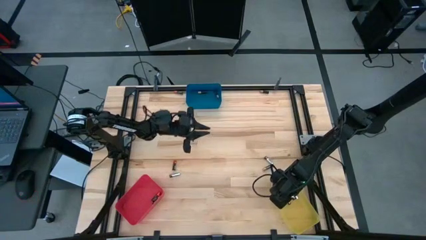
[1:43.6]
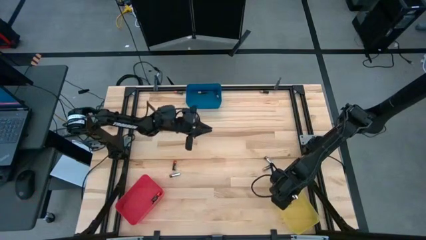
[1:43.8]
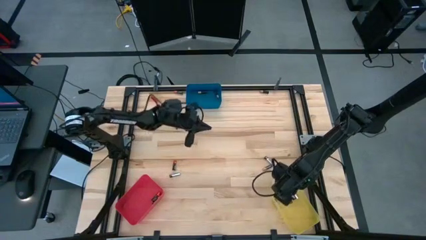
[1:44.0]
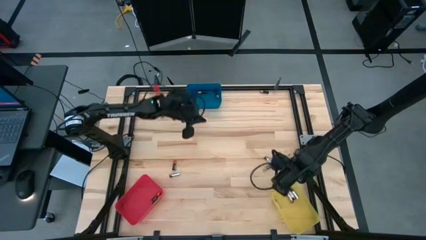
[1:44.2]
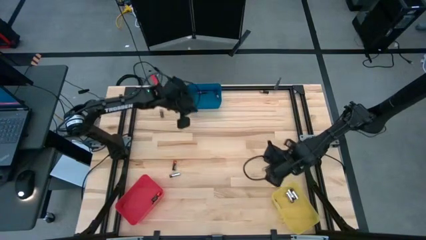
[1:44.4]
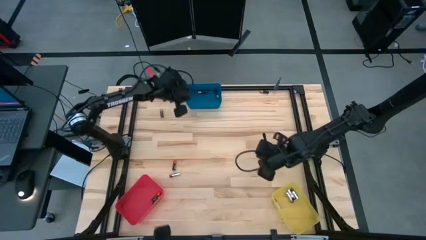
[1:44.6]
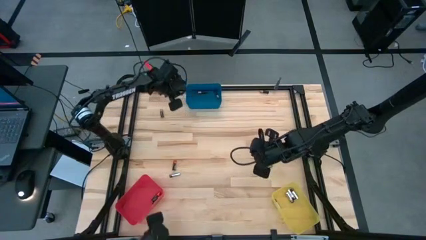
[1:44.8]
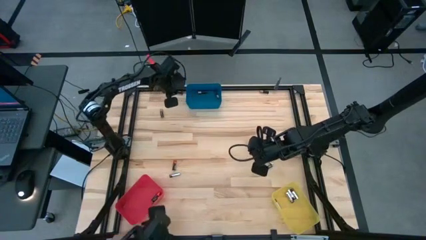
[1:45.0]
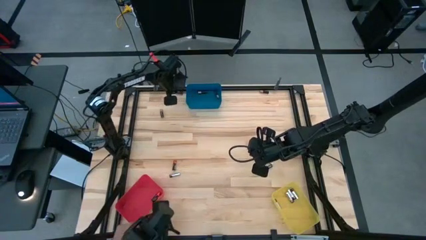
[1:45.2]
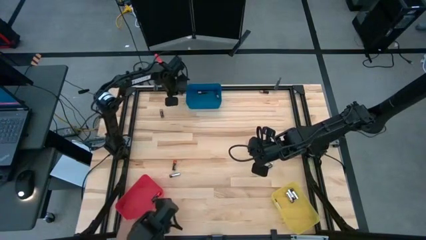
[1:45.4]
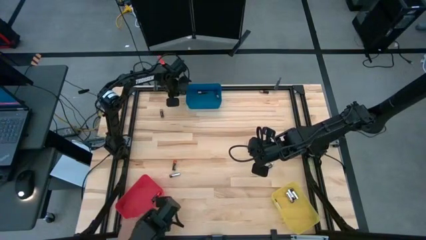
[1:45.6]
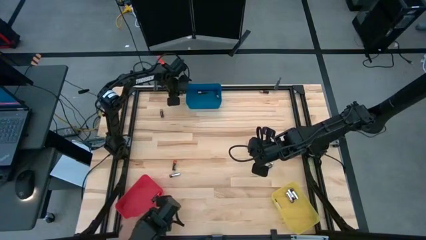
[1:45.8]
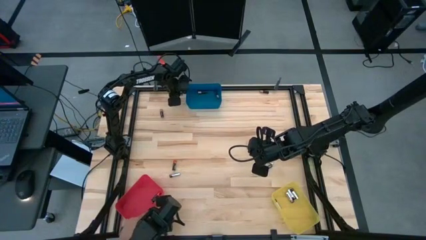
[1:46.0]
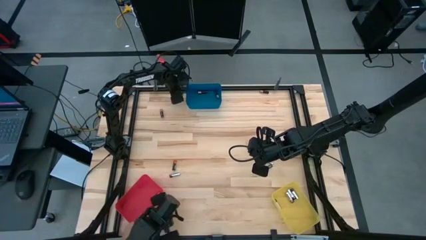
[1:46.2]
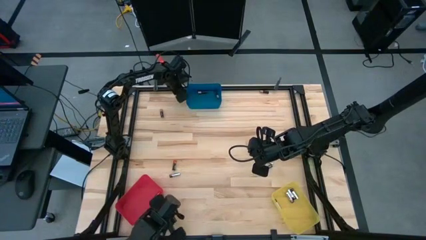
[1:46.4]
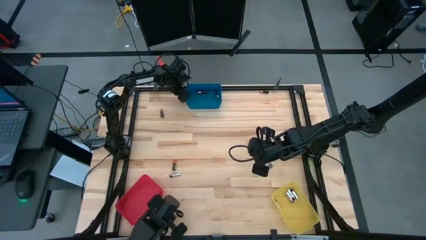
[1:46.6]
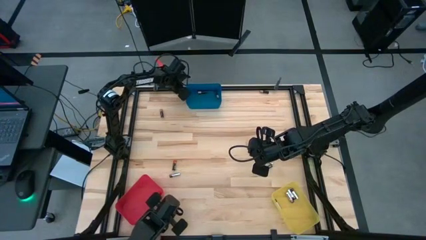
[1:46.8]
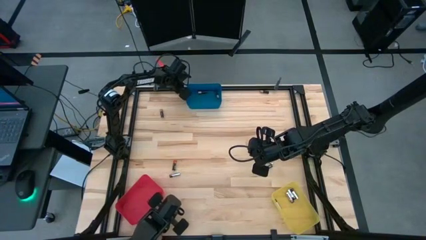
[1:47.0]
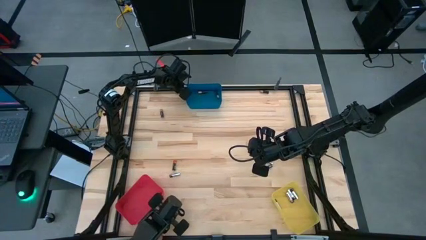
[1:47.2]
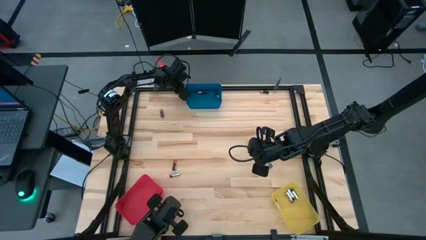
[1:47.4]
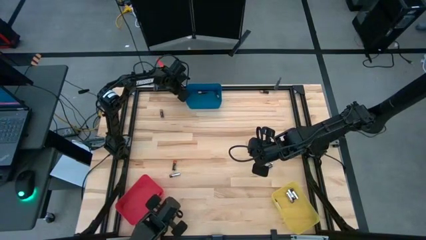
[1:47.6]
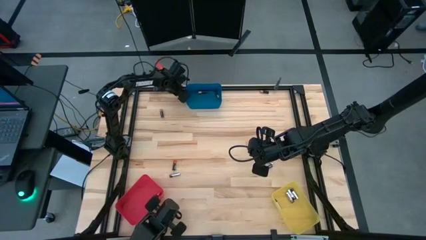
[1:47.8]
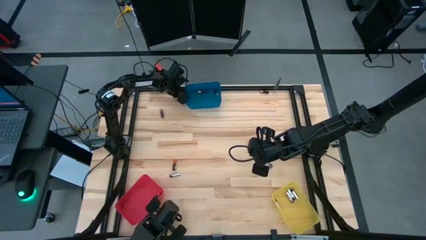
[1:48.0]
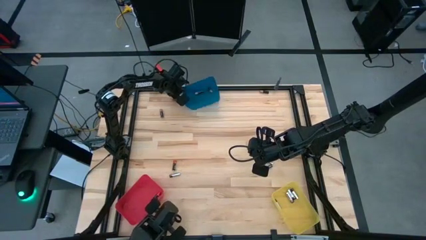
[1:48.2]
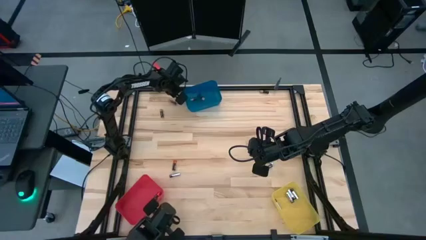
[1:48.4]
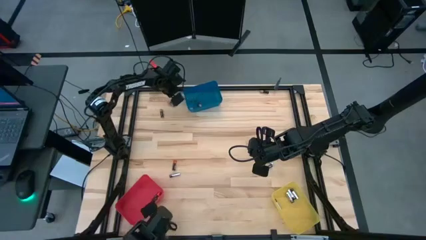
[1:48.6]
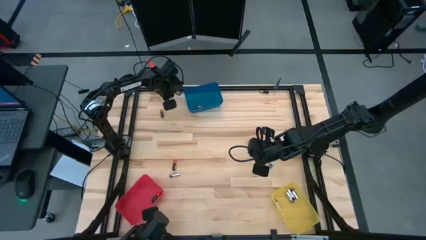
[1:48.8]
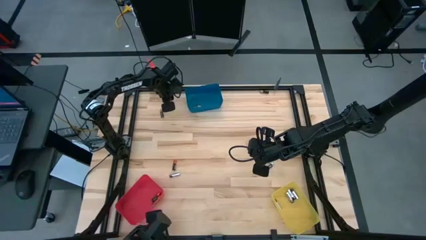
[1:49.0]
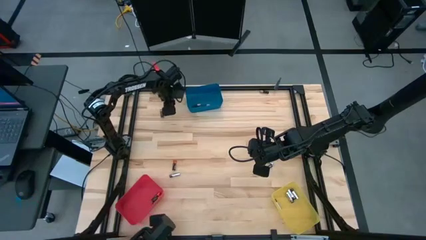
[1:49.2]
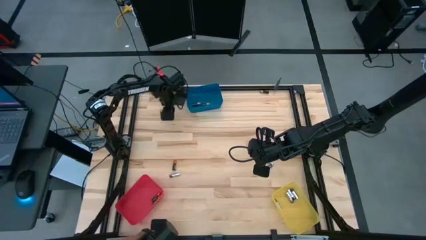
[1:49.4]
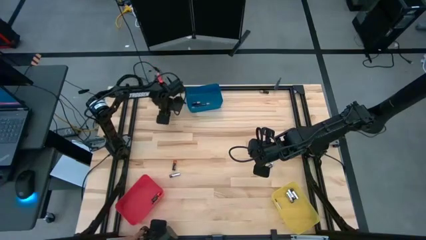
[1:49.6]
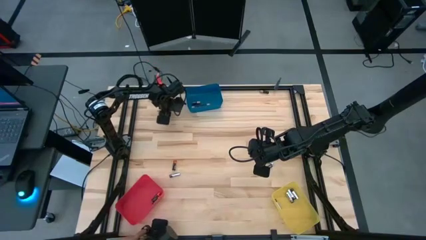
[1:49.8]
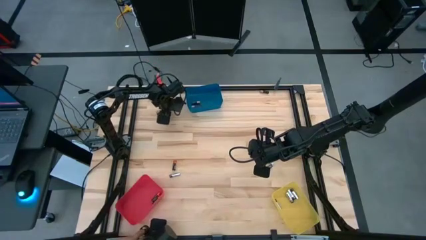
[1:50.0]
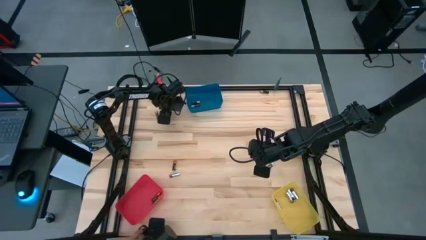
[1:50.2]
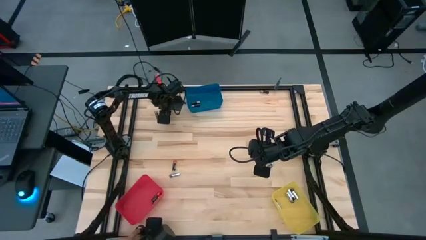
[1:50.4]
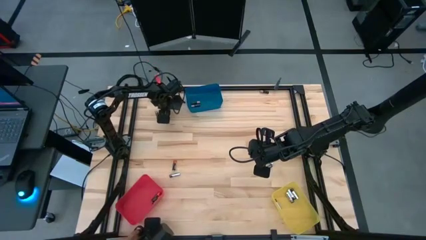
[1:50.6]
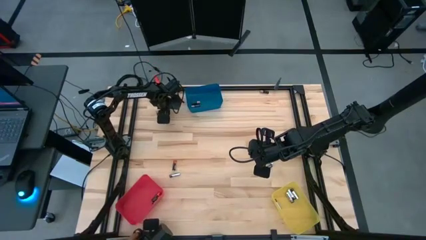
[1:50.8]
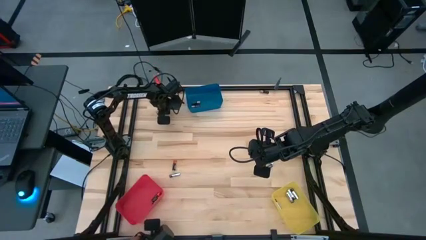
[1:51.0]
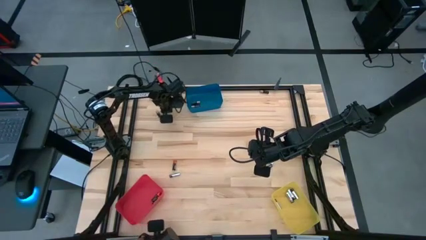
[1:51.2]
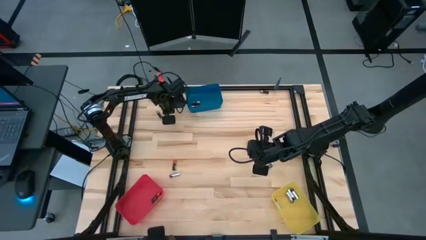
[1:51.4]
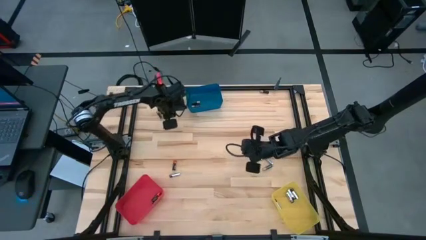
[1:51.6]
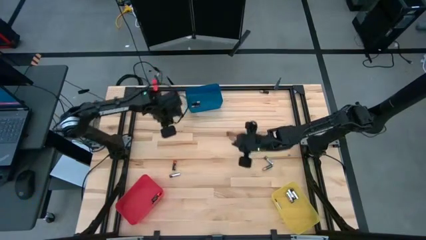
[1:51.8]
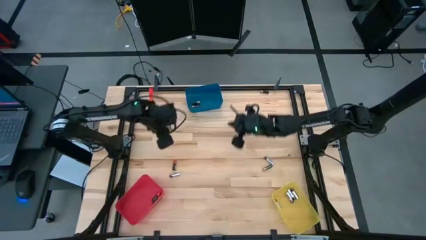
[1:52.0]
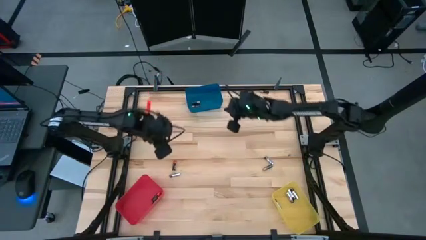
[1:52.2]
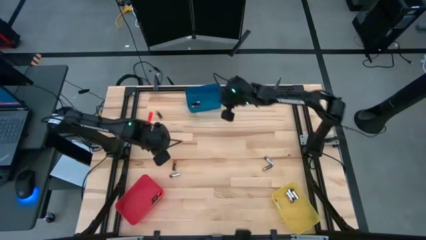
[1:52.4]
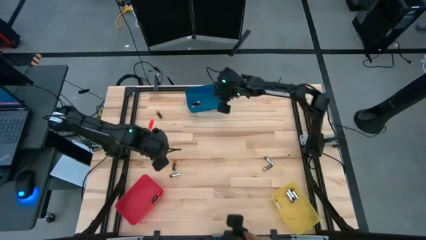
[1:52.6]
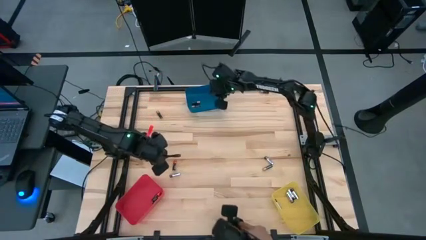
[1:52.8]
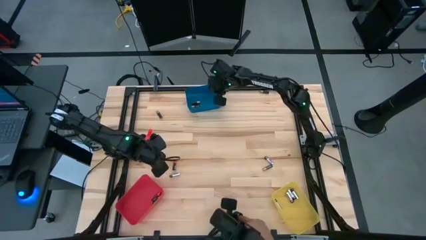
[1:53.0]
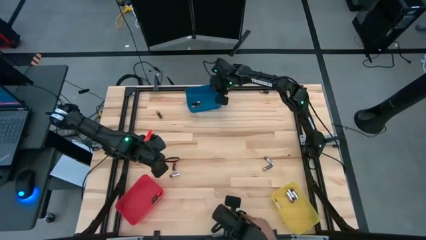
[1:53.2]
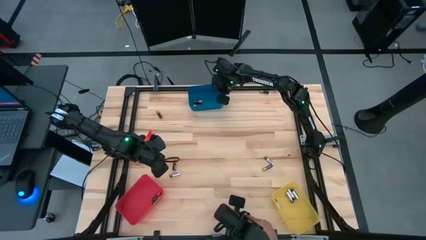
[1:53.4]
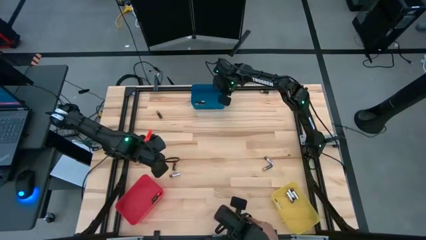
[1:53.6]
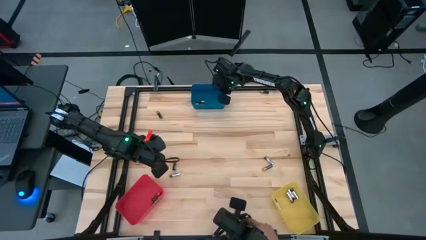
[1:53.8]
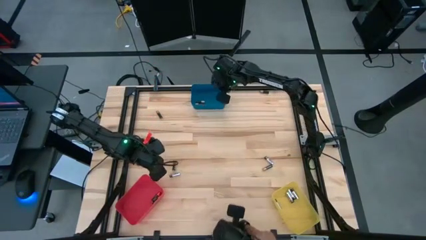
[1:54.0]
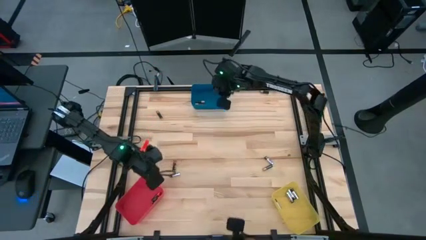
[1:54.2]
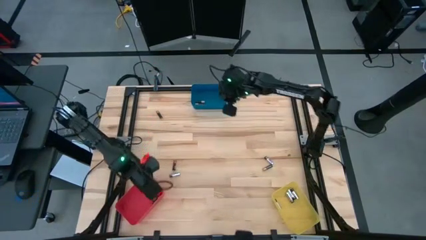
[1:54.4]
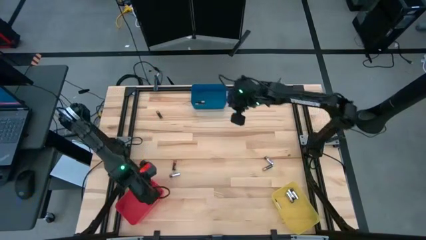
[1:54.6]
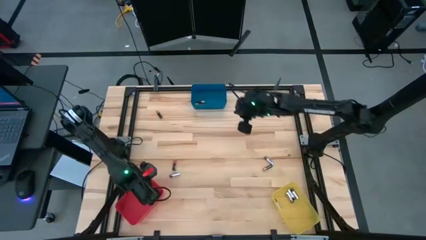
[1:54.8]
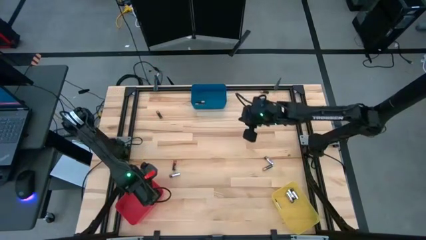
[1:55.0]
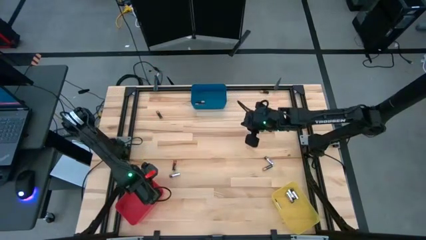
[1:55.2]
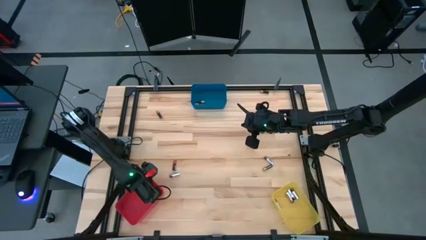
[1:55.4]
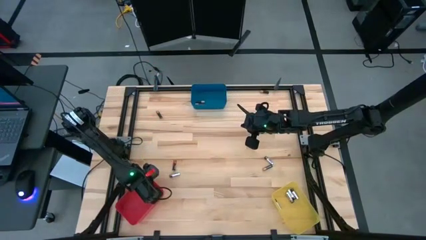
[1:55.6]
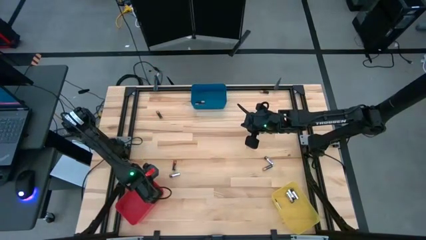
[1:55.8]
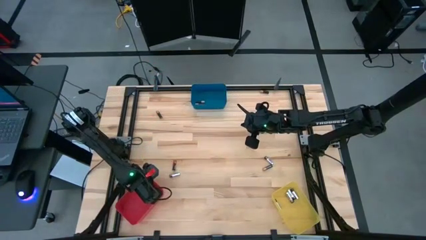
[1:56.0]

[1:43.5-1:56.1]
Task: Sort batteries
Put the black-red battery into the red bin
